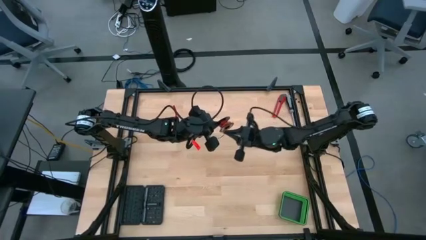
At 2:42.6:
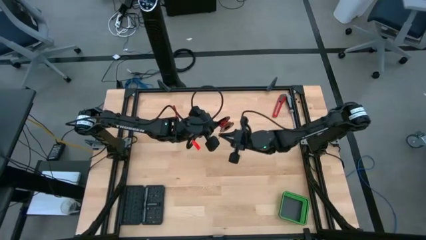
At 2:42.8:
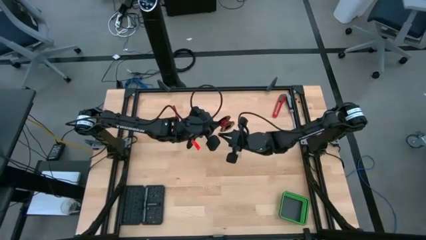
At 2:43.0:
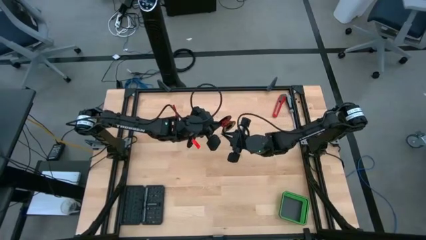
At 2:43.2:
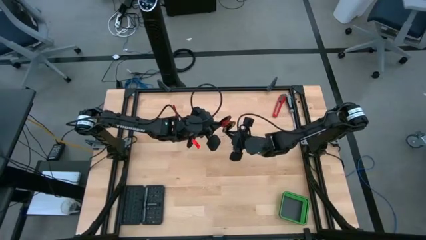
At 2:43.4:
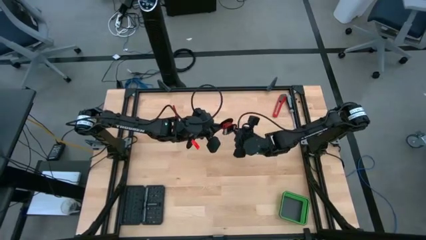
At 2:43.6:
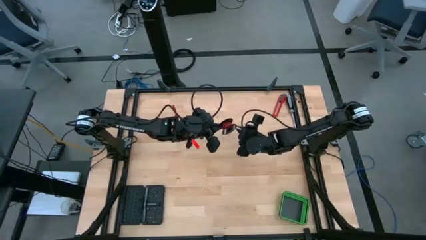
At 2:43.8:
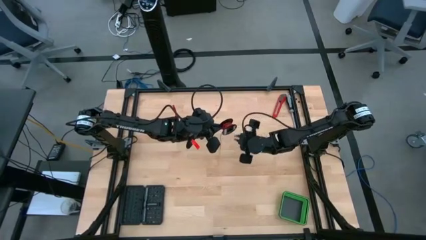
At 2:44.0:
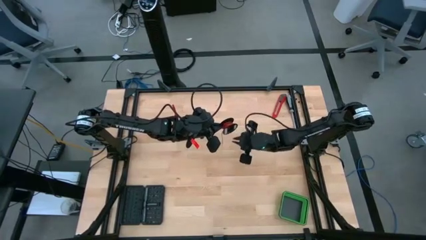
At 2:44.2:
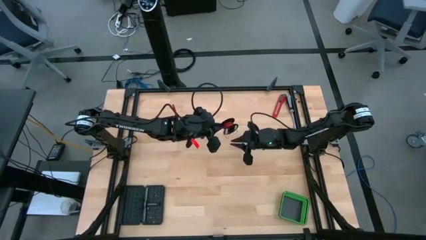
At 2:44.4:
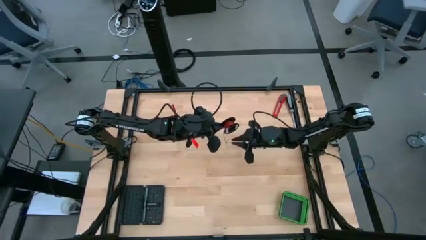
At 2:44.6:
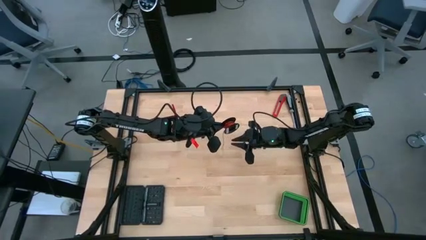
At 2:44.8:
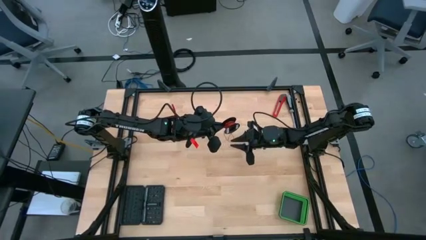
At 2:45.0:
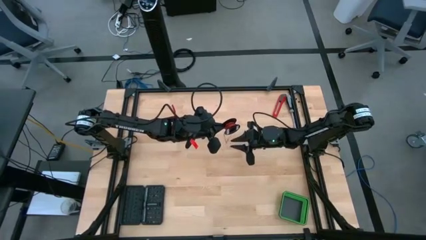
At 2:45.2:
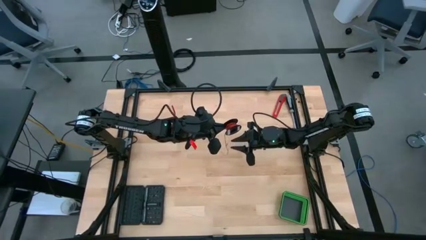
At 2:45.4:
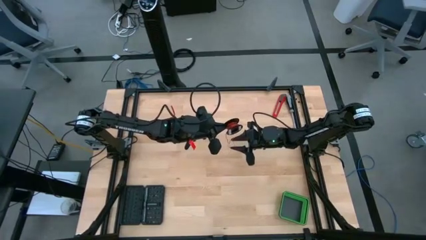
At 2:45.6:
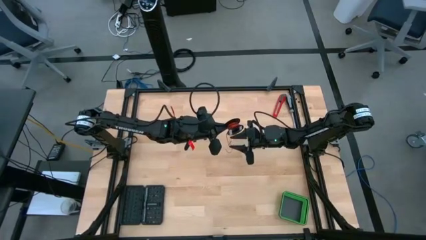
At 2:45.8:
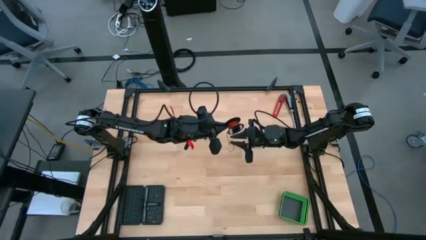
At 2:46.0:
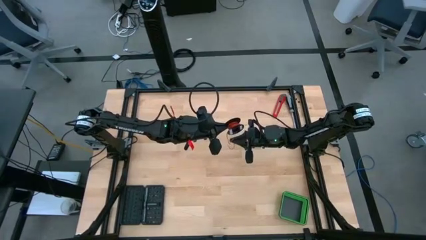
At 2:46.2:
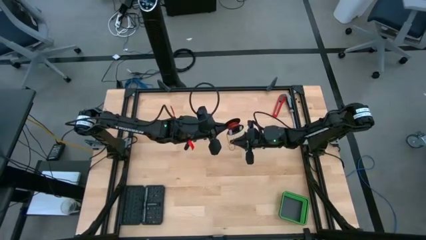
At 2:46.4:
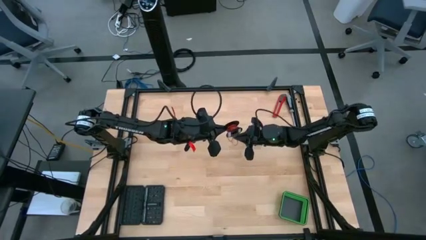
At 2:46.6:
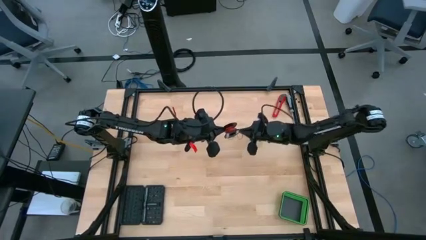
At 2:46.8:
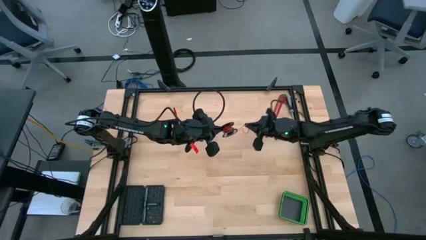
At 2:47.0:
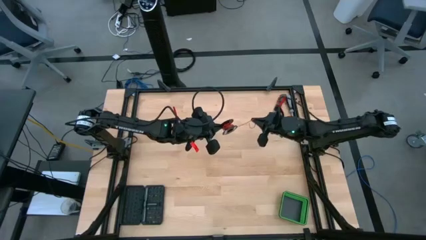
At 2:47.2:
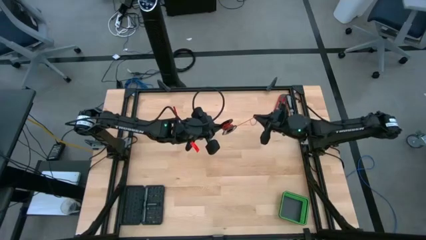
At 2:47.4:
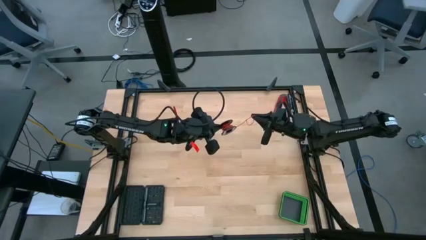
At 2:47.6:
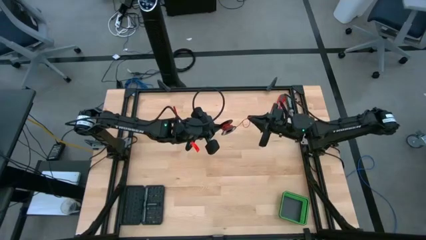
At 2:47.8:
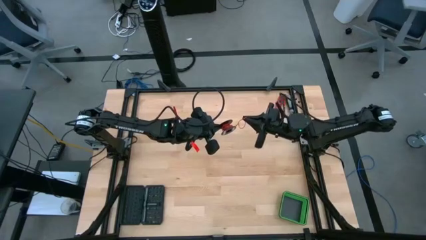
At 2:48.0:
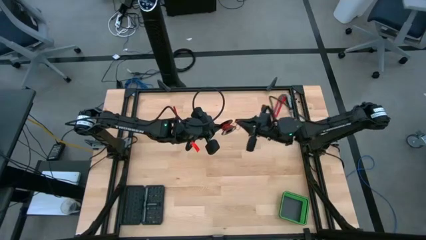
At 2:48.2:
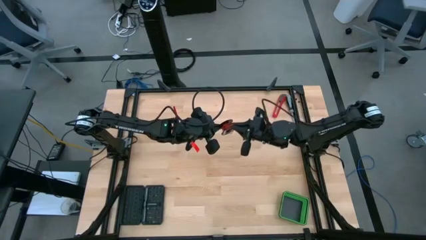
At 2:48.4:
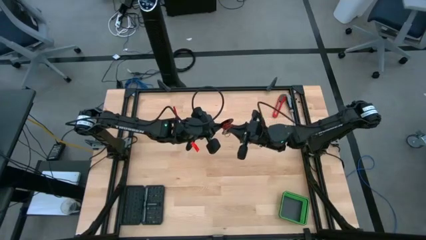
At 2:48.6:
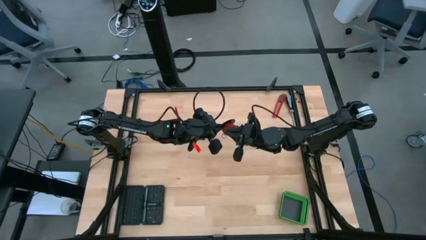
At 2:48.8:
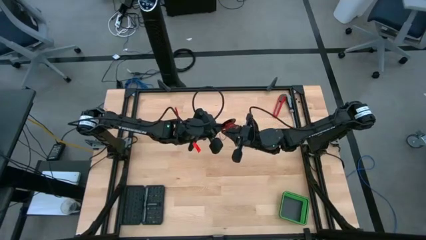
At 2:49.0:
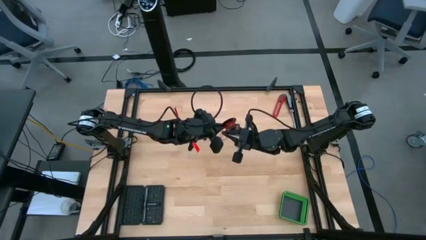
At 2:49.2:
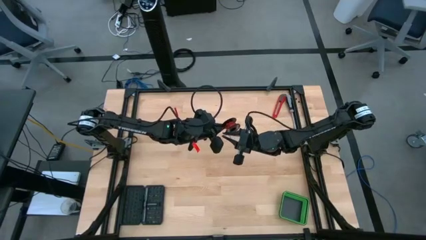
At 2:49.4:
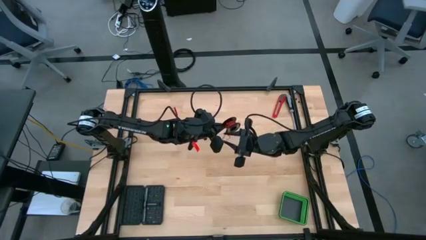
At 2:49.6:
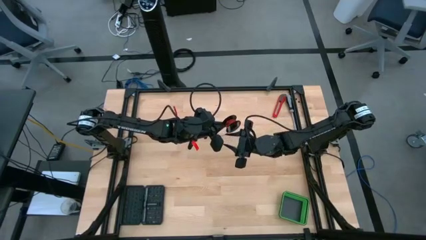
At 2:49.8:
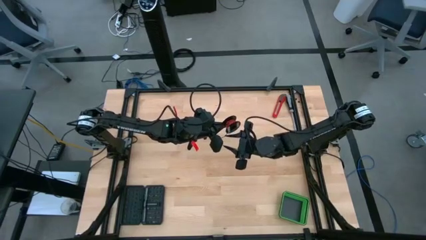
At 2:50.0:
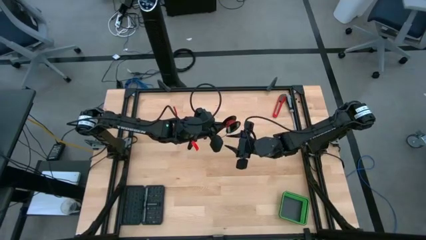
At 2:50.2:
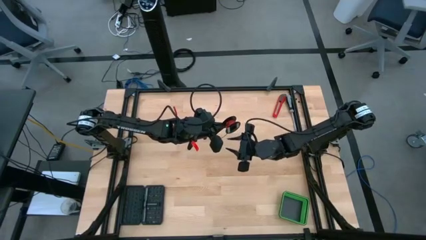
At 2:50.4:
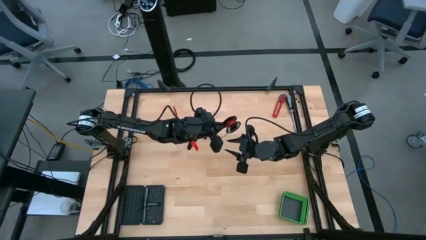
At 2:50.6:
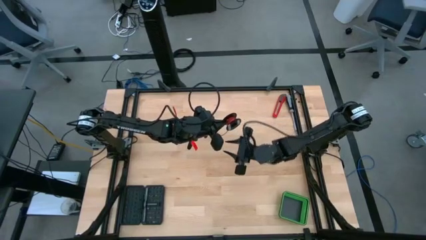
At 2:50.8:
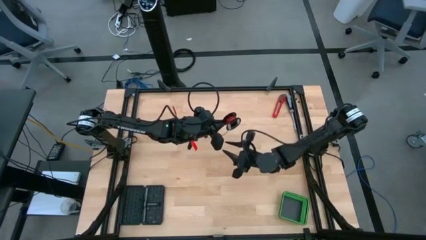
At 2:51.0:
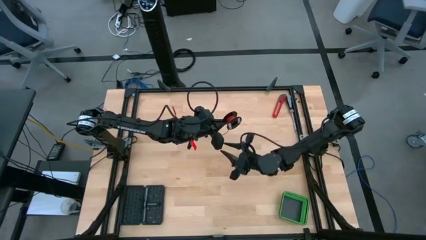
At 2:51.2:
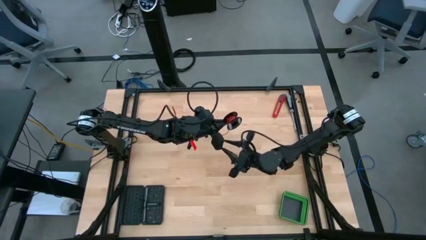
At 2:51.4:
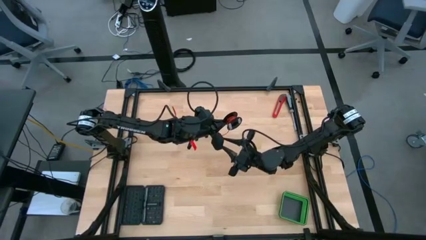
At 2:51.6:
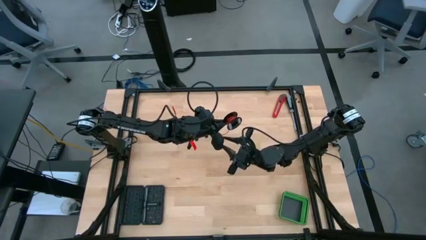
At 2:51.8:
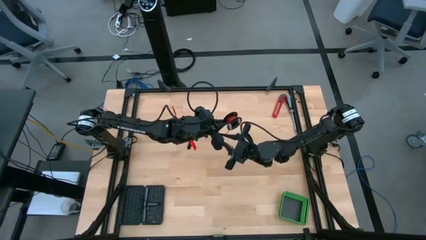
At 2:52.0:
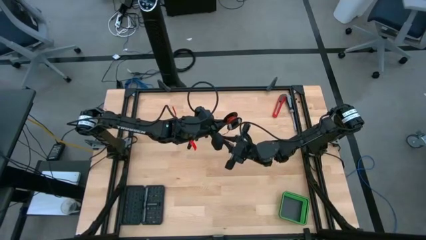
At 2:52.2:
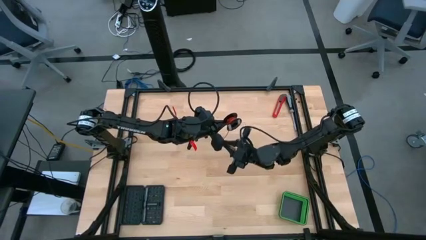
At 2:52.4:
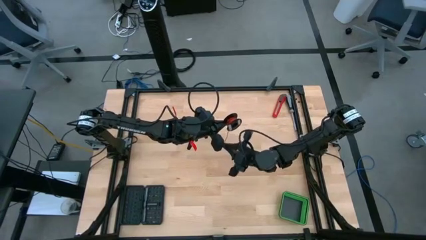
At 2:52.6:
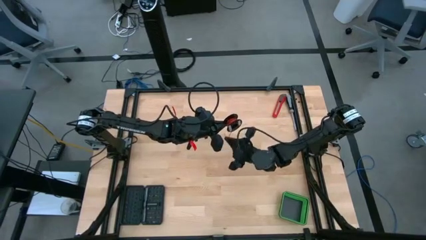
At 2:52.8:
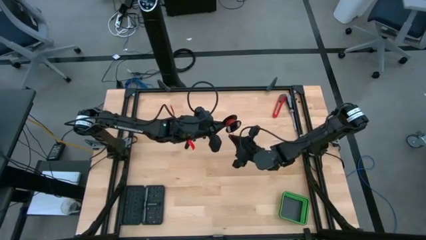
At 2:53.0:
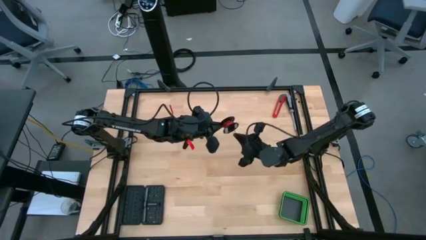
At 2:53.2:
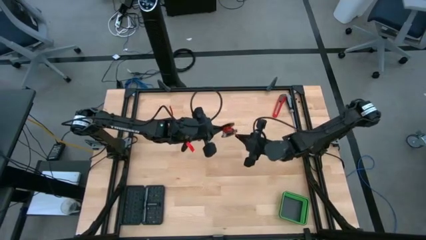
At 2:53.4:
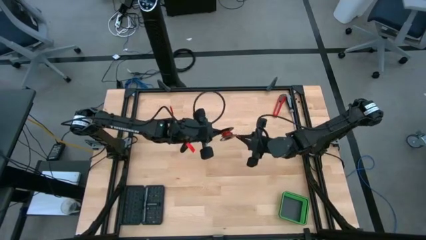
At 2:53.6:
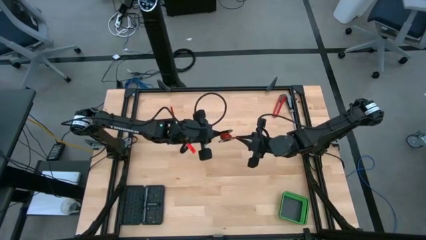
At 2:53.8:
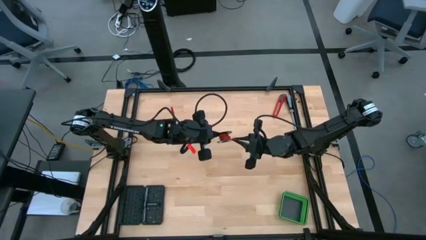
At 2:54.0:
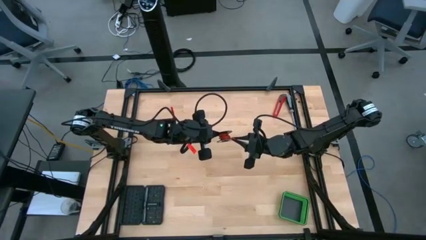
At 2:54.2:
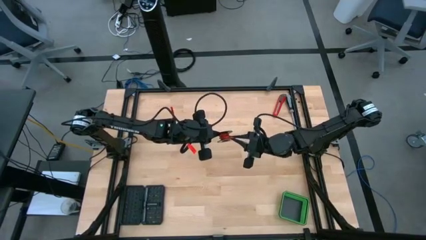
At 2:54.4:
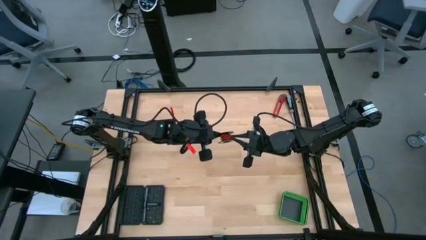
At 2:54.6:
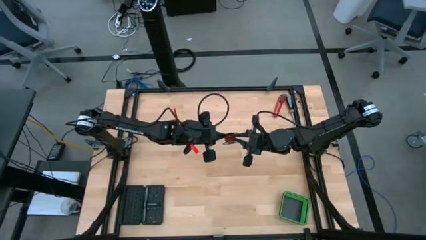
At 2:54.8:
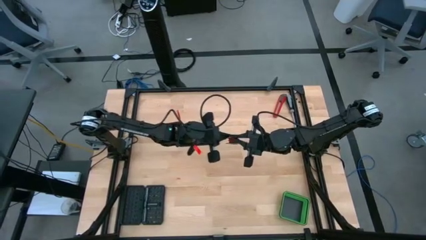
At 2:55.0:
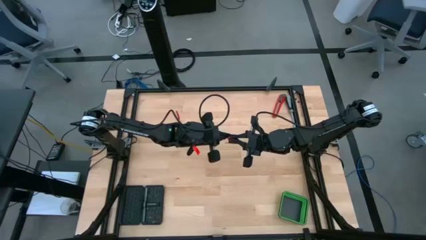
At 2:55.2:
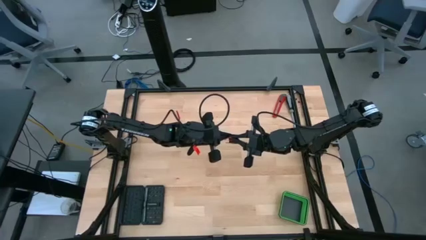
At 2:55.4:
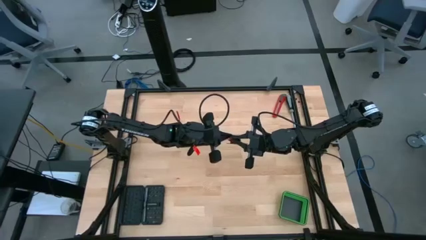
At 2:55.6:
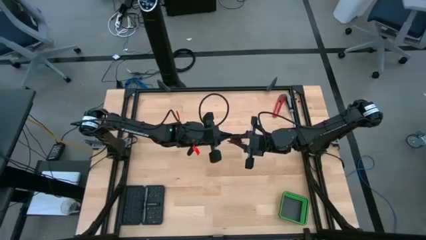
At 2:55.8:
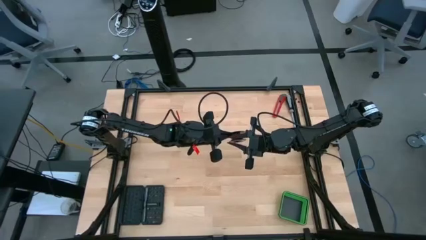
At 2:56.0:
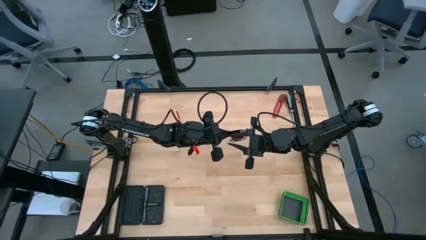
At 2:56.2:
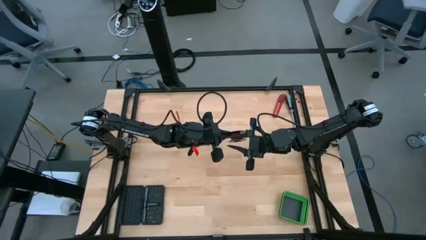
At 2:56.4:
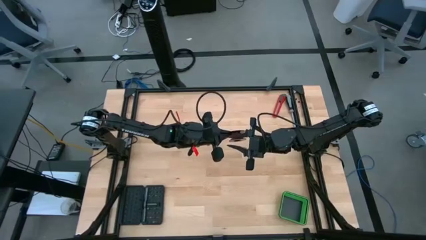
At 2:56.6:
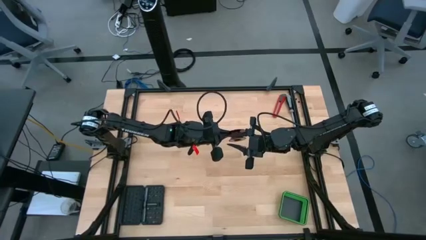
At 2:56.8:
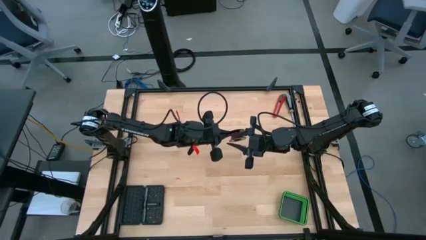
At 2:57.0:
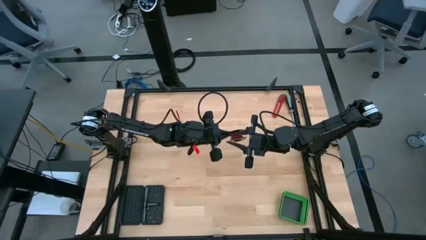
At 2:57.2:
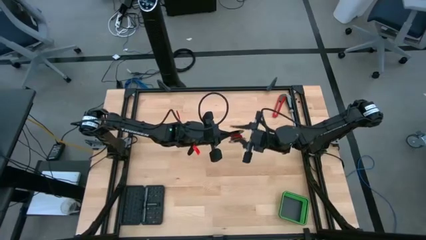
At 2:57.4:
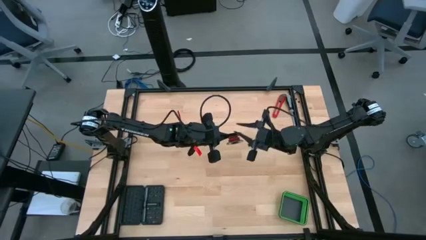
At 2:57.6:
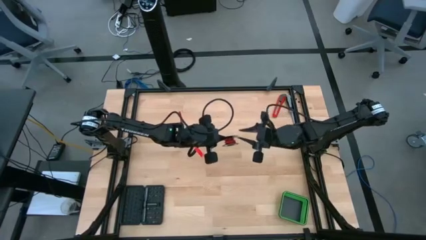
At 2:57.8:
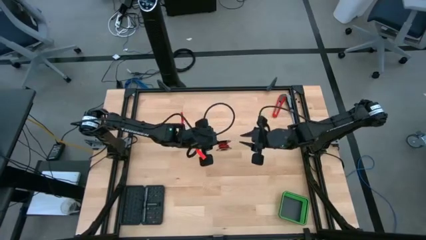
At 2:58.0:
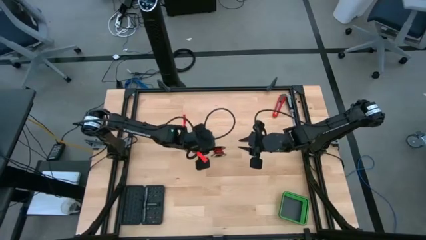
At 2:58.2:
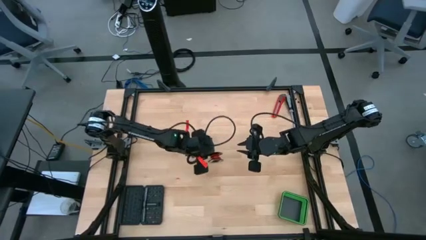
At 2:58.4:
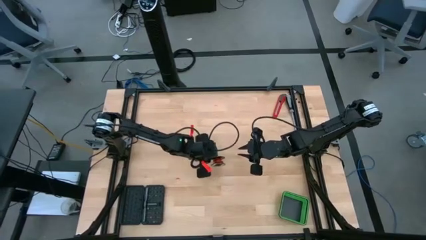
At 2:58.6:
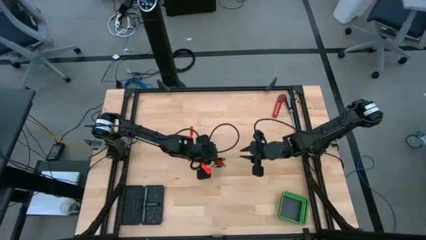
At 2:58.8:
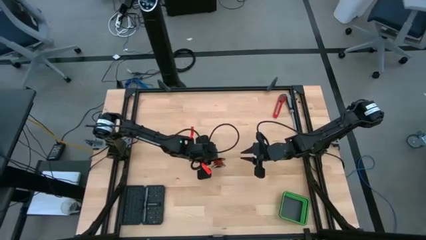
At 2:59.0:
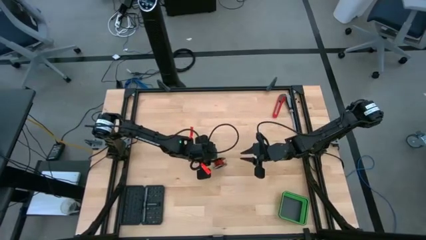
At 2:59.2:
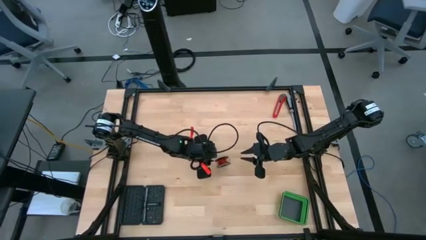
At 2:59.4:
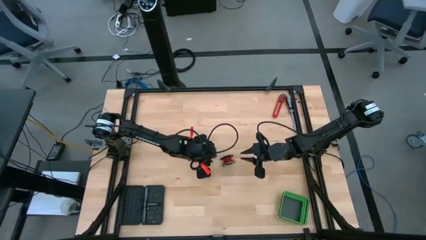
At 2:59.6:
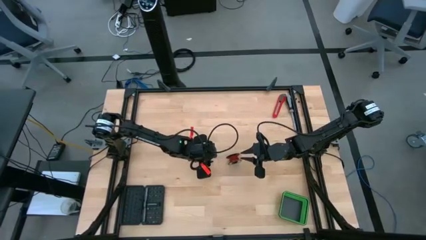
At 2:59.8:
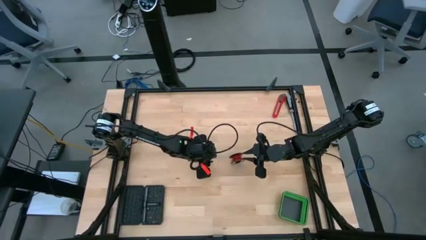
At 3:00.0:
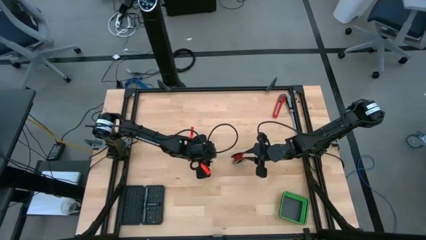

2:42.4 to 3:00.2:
Task: Coil cords
Coil the red wire onto the black spool
